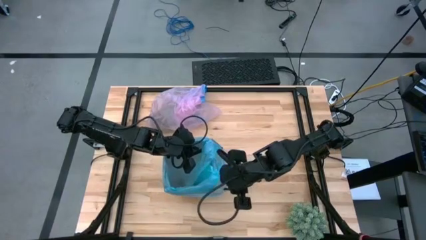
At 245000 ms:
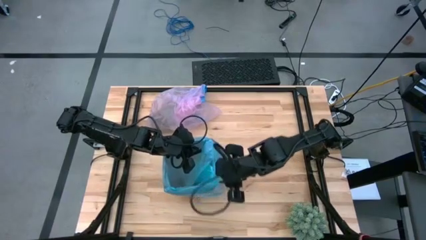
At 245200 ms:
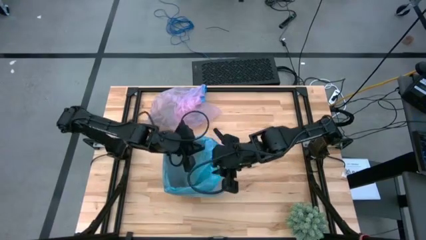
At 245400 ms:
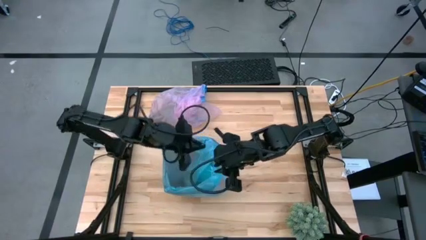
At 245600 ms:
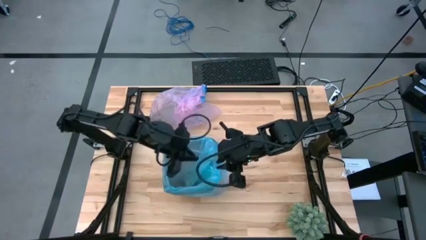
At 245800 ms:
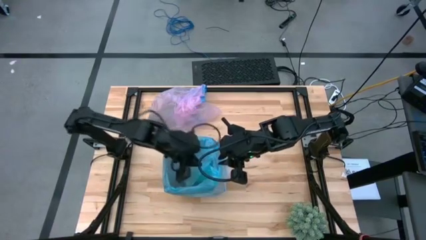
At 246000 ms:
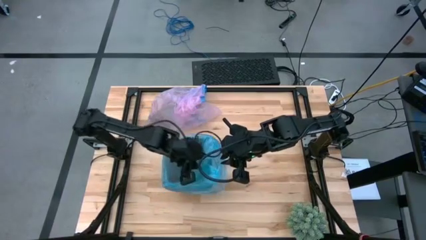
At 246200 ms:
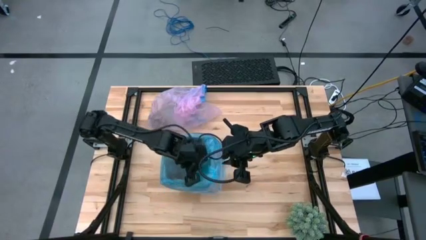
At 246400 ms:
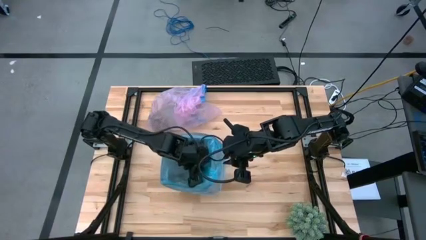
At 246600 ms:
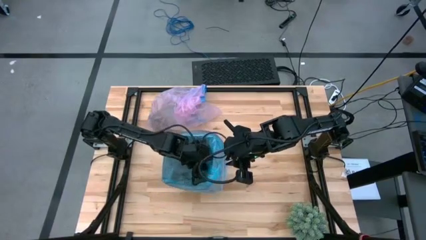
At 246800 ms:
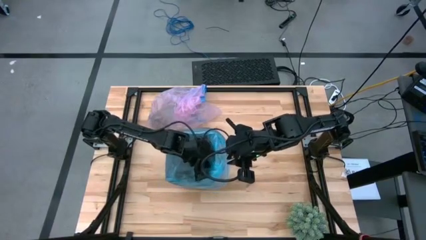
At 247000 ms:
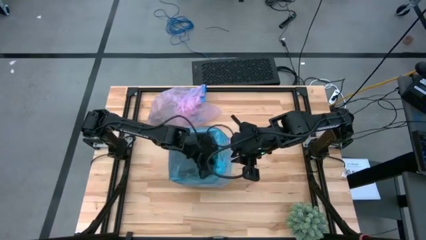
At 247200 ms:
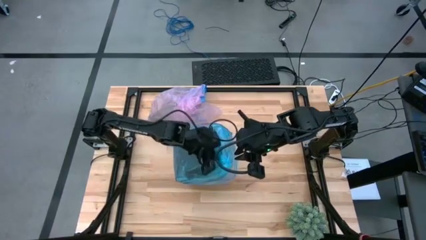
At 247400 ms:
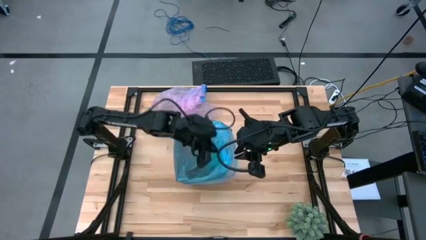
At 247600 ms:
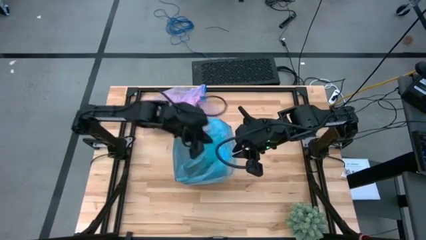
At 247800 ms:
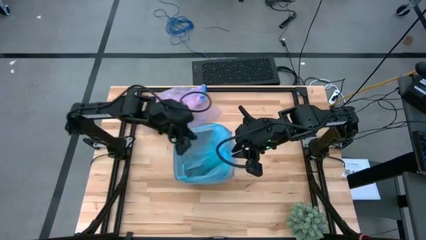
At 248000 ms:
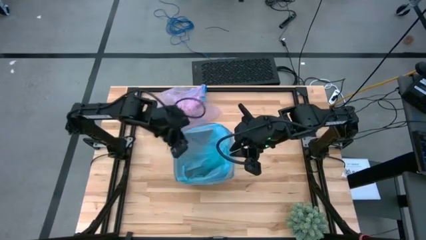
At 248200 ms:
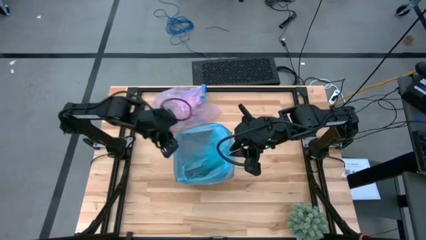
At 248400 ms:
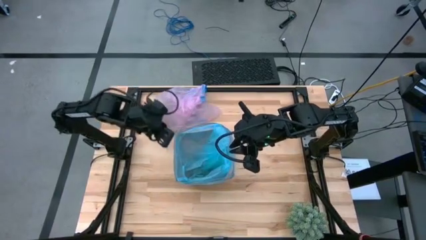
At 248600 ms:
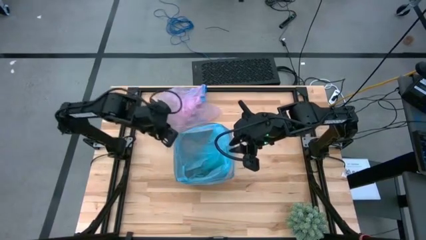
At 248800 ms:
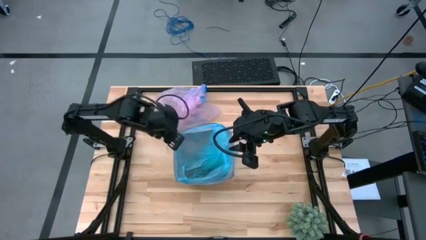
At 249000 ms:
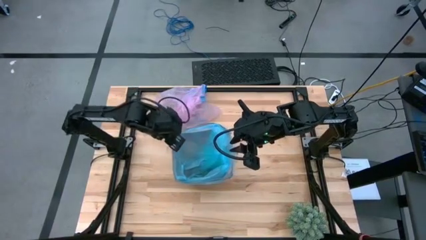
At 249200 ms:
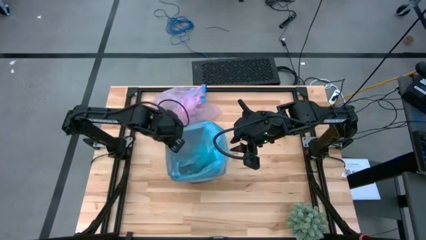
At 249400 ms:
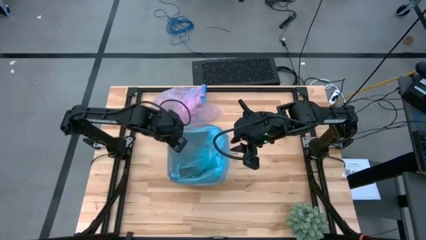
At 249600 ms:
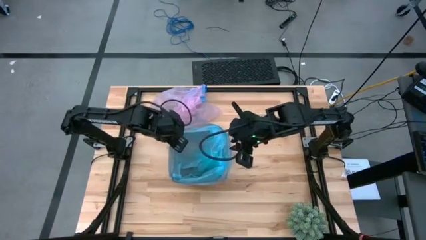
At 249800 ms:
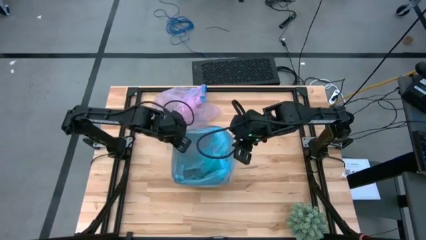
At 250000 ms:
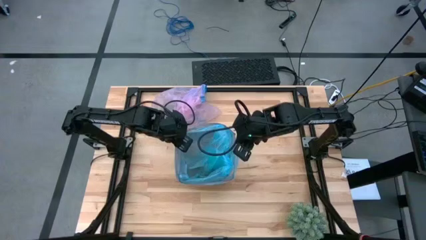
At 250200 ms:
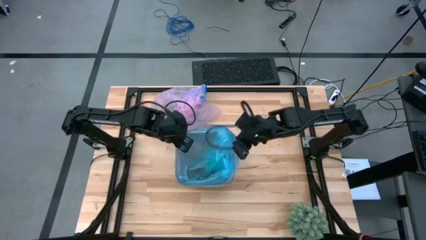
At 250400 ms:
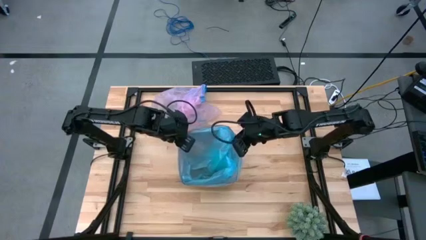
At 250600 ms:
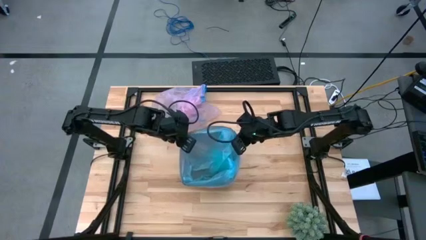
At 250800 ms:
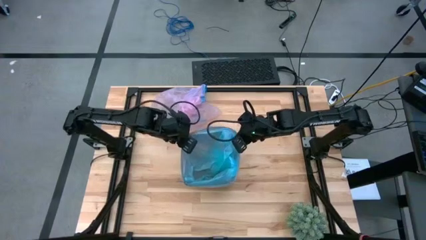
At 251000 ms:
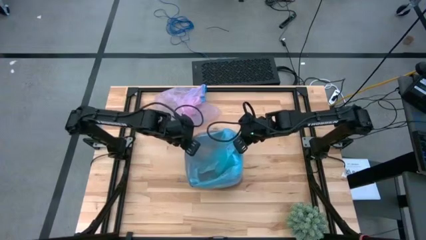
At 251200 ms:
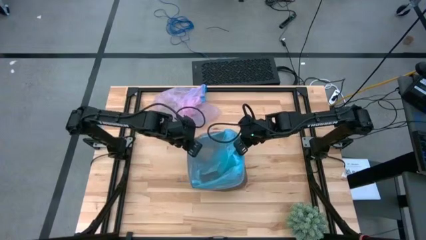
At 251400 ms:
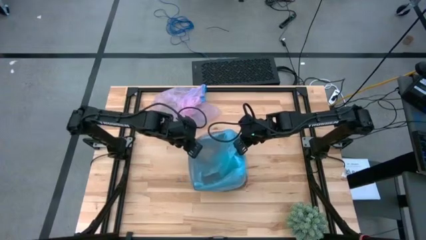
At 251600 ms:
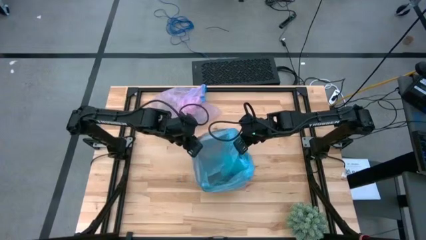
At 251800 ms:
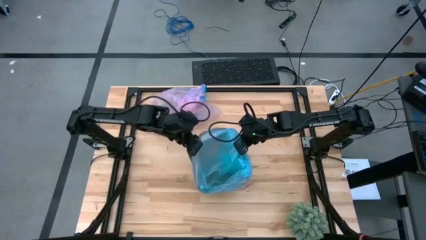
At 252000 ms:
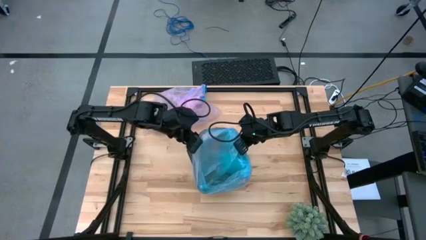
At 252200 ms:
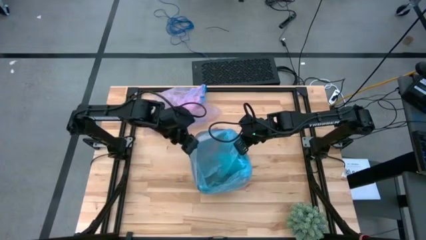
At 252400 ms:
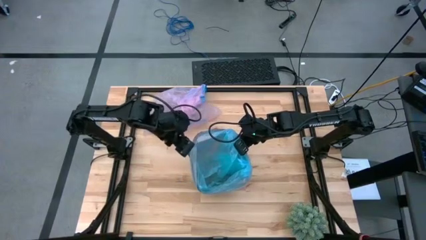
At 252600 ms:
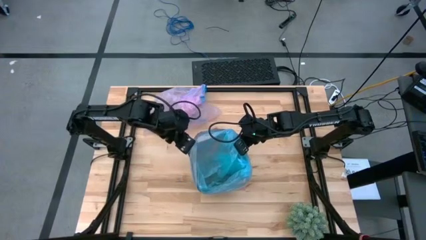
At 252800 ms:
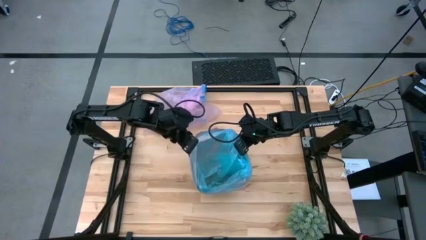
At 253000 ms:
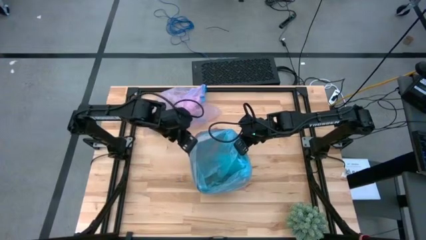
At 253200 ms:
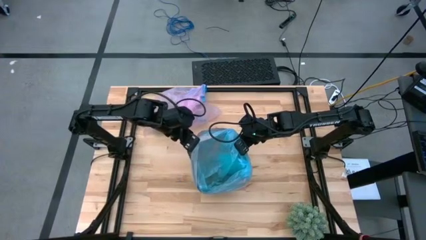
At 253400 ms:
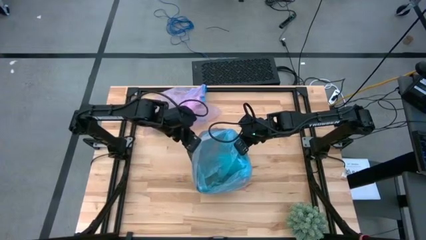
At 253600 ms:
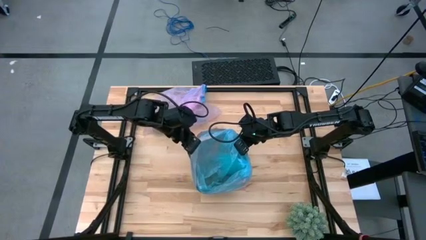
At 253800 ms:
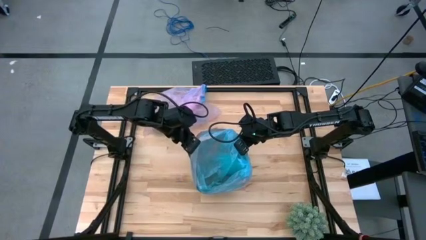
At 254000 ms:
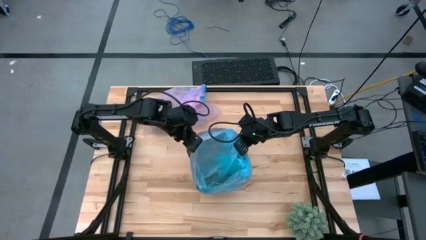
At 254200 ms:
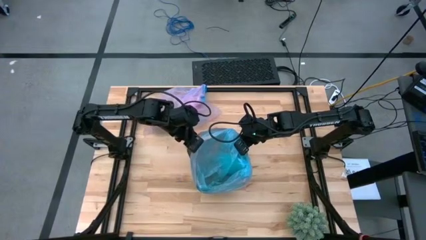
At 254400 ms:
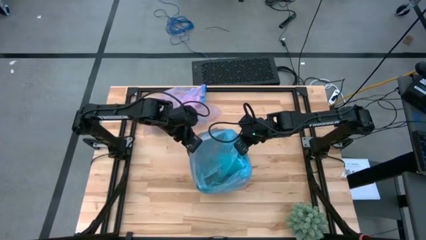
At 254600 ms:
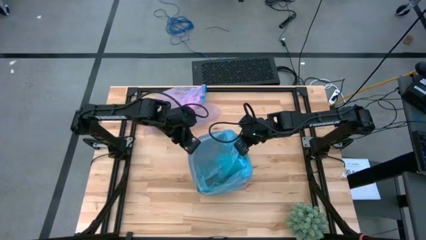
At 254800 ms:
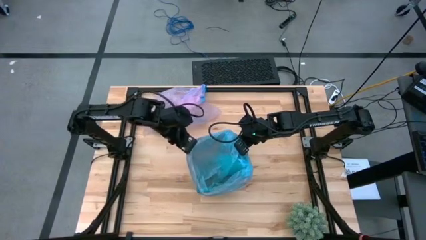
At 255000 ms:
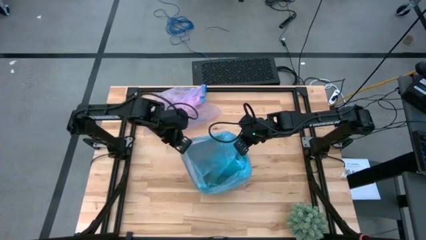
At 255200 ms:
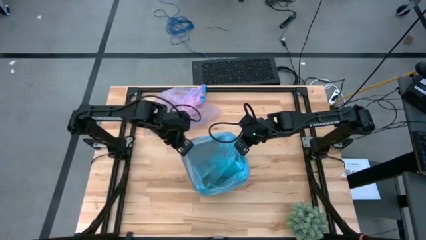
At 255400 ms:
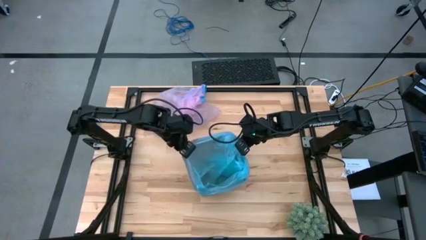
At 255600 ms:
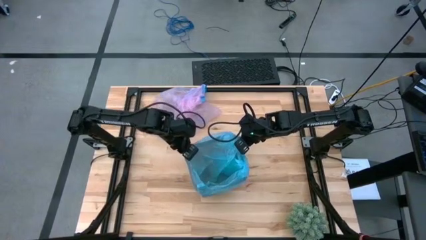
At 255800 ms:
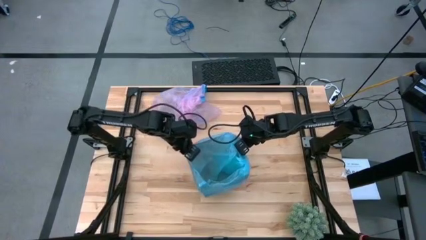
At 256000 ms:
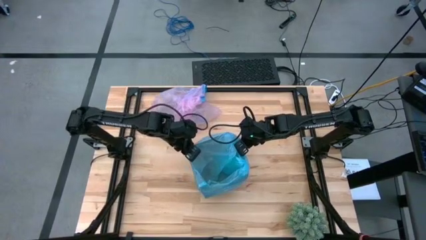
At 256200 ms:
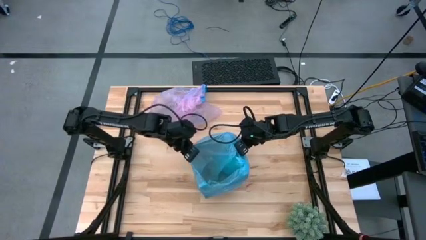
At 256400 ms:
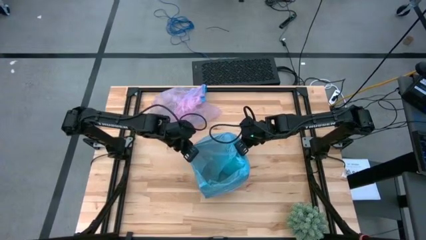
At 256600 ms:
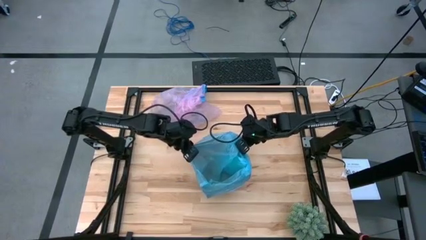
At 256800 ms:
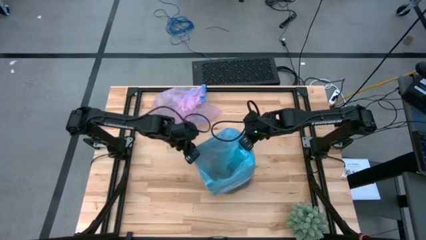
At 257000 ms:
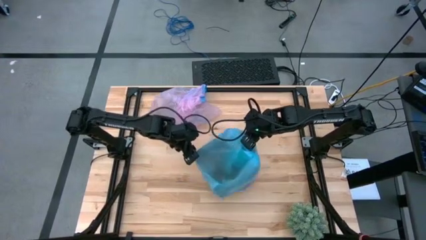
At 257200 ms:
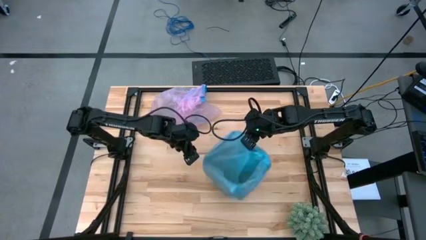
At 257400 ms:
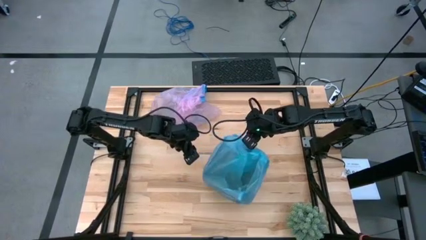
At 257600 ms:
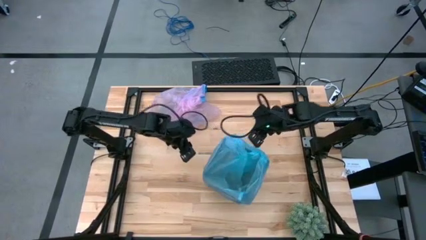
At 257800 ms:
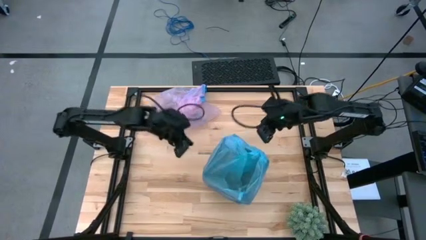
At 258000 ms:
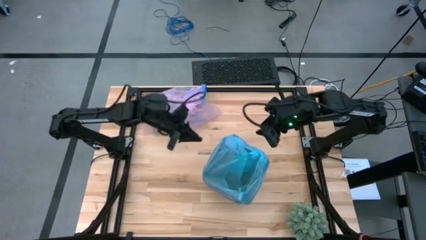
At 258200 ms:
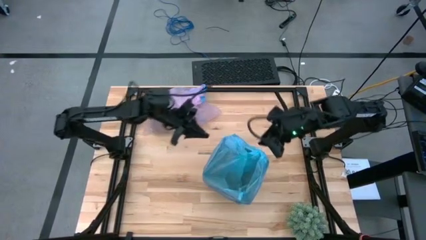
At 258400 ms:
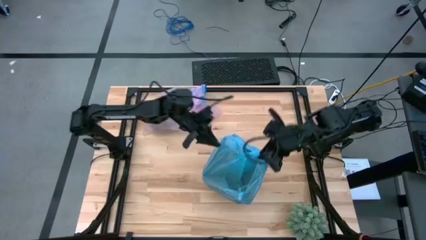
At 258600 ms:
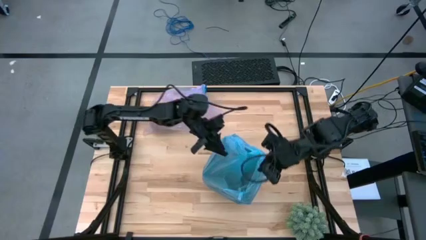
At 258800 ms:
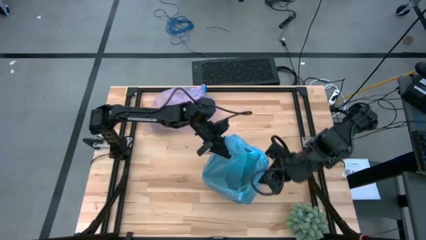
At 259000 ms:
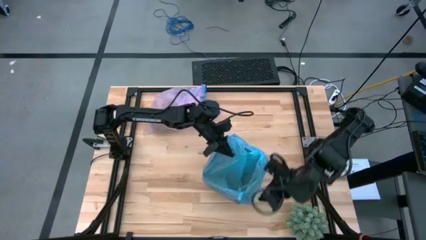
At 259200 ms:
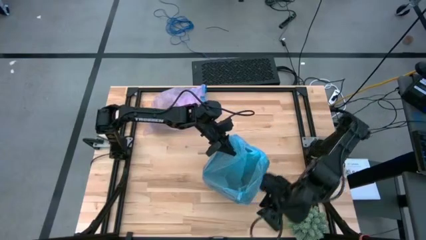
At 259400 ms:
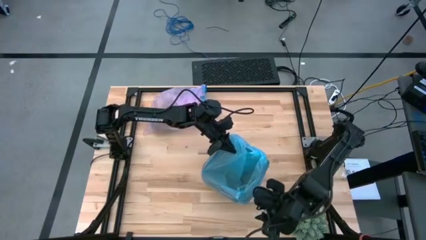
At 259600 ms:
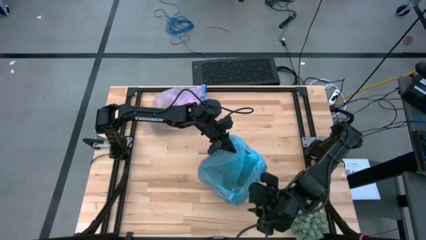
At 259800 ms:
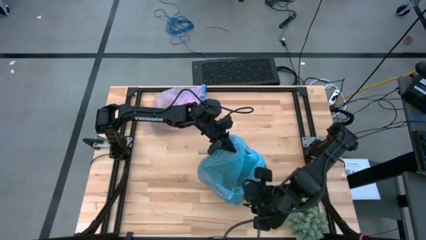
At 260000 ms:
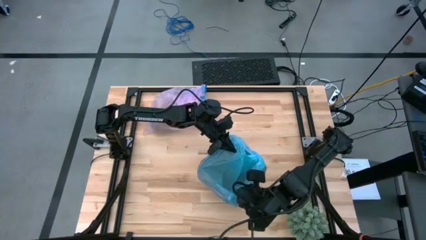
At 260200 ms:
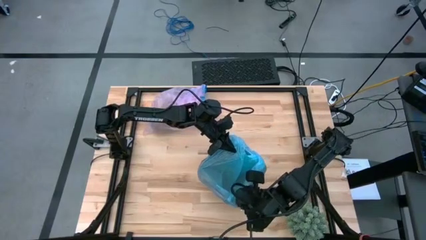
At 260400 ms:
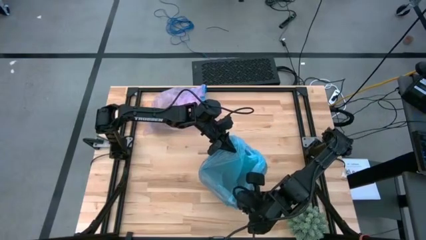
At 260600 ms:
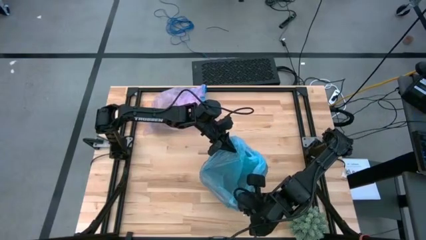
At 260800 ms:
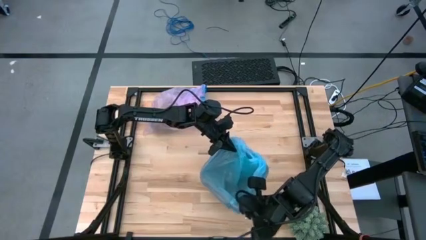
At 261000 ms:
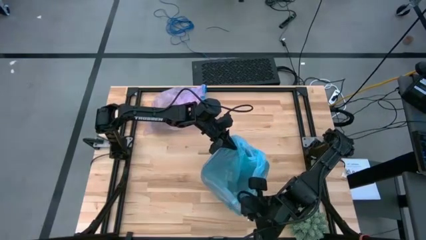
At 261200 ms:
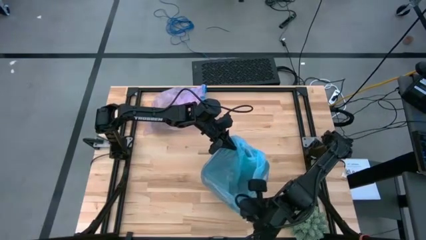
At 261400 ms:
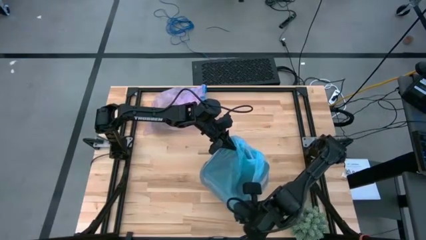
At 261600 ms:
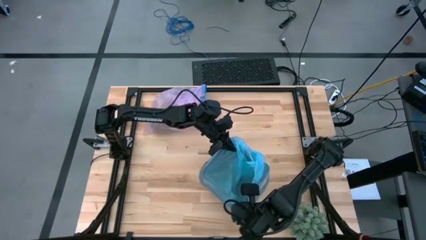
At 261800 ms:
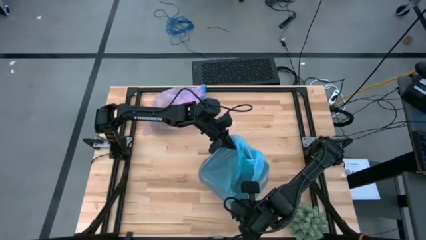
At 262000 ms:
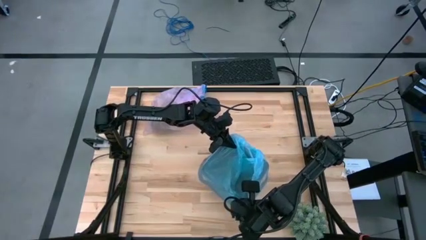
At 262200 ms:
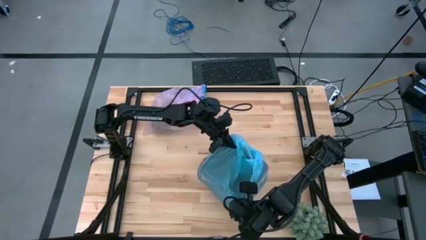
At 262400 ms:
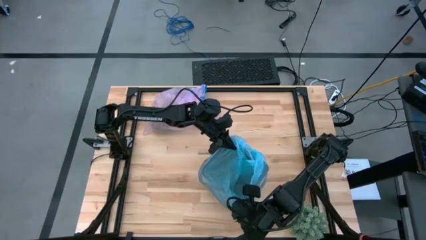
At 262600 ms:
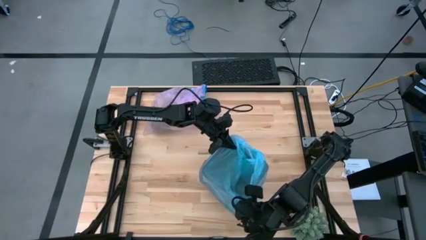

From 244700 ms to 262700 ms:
Task: place trash/remove bag and relplace
Insert the new trash bag into the trash bin
